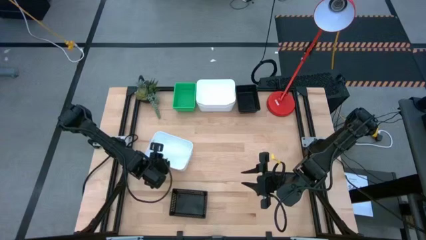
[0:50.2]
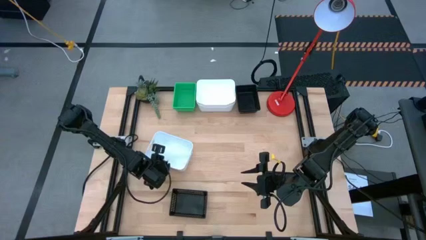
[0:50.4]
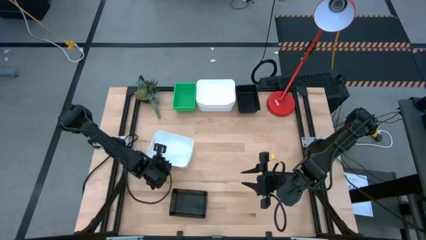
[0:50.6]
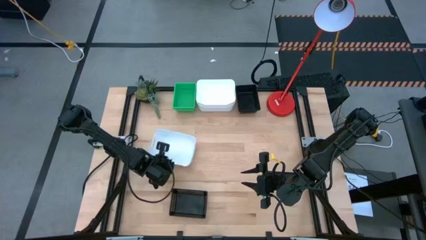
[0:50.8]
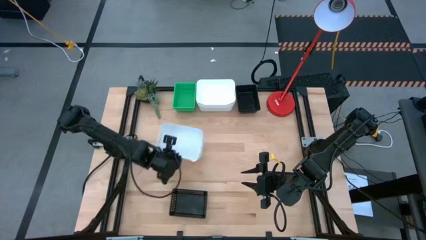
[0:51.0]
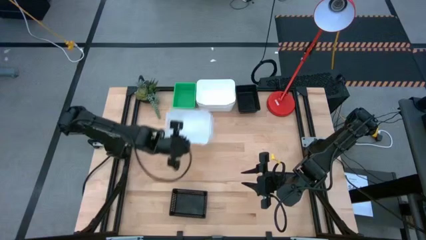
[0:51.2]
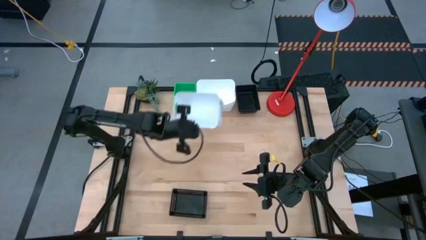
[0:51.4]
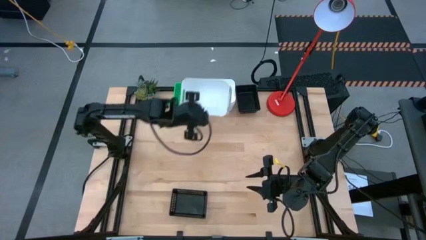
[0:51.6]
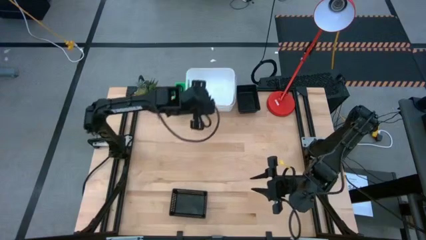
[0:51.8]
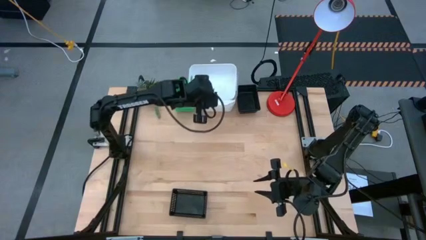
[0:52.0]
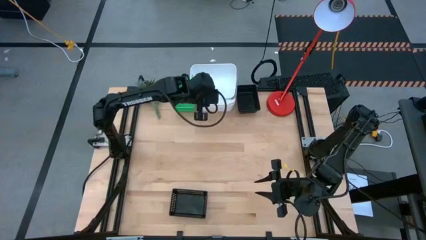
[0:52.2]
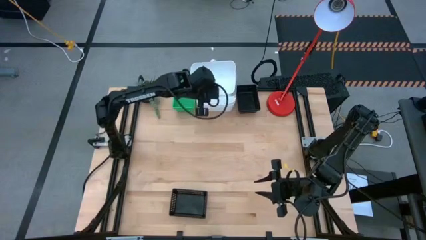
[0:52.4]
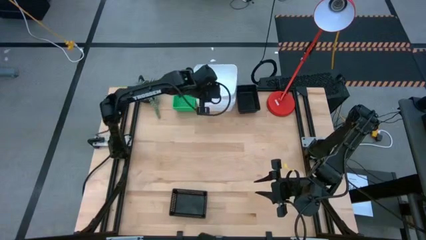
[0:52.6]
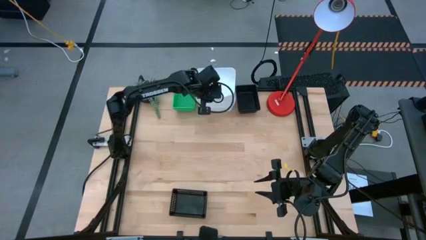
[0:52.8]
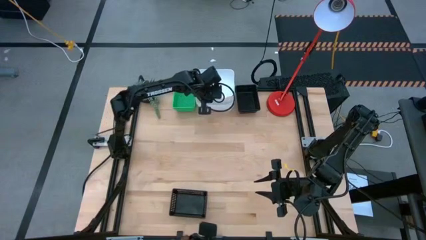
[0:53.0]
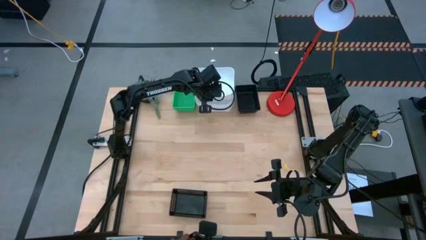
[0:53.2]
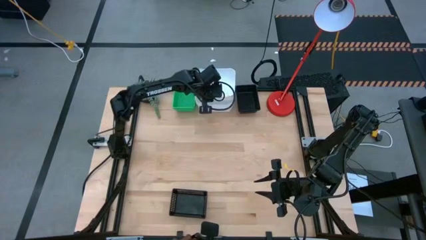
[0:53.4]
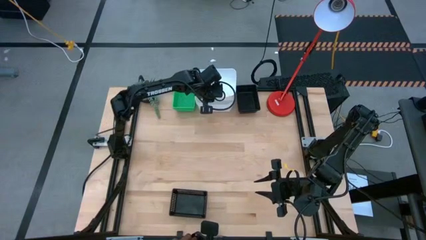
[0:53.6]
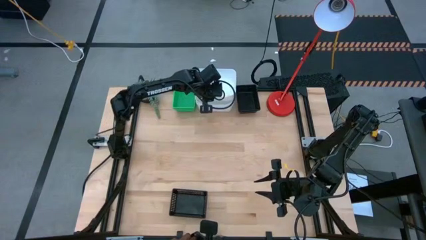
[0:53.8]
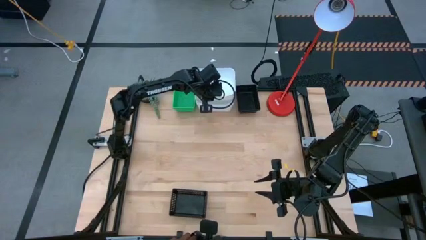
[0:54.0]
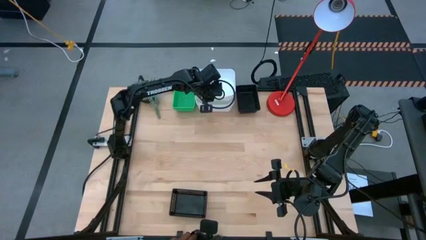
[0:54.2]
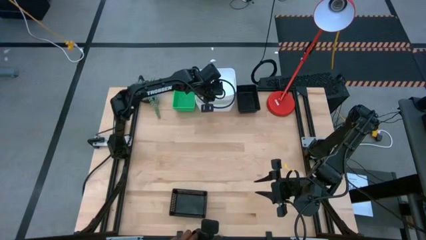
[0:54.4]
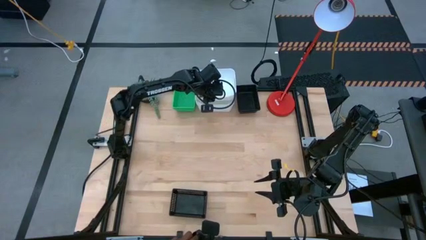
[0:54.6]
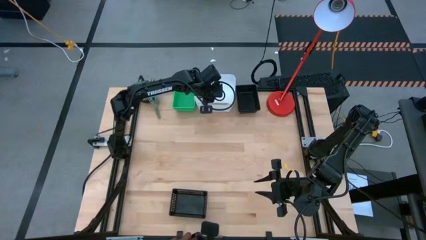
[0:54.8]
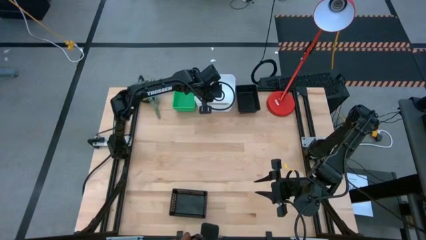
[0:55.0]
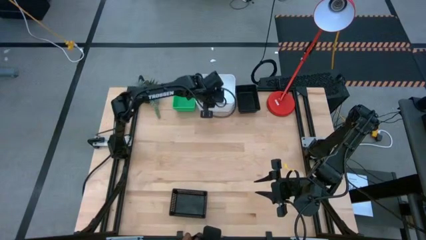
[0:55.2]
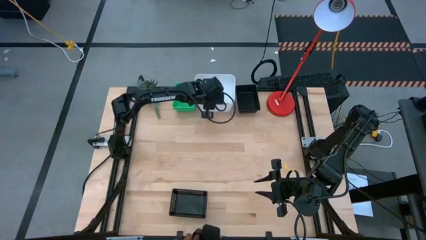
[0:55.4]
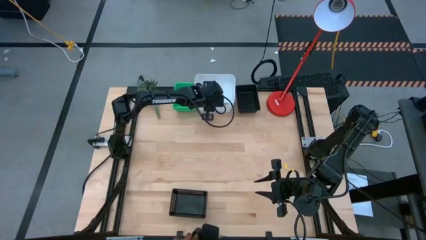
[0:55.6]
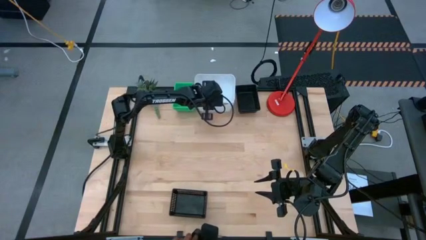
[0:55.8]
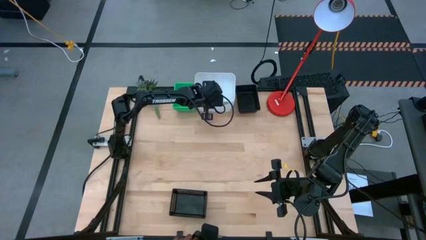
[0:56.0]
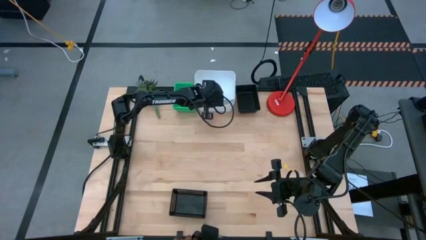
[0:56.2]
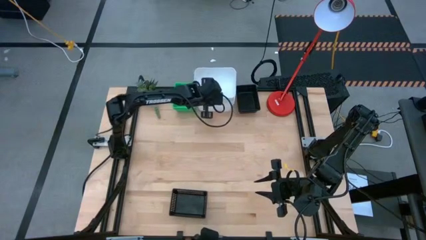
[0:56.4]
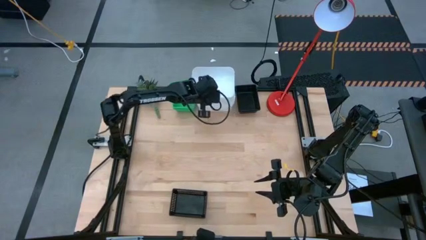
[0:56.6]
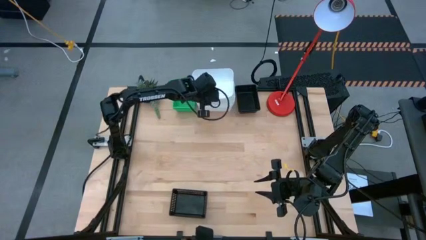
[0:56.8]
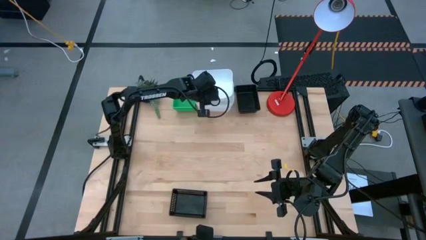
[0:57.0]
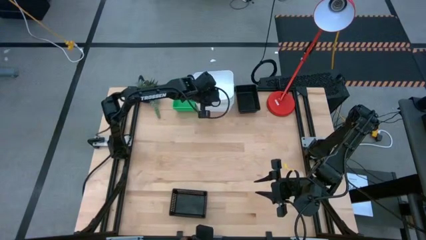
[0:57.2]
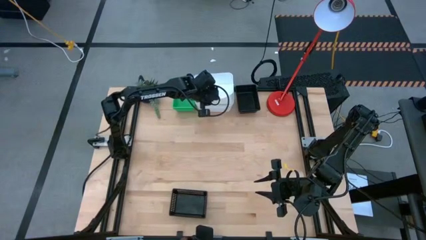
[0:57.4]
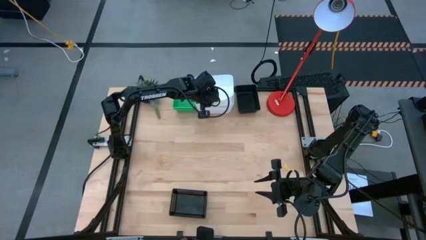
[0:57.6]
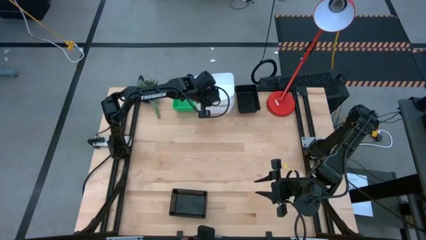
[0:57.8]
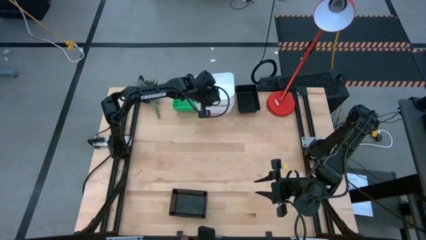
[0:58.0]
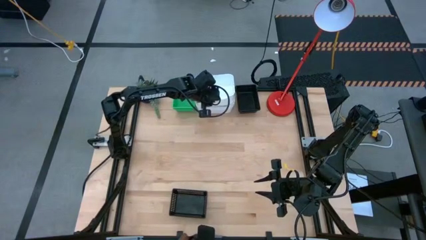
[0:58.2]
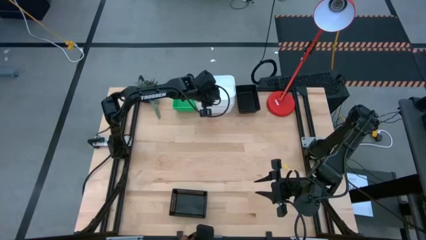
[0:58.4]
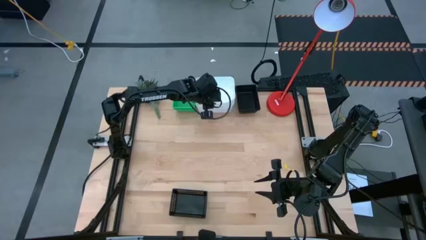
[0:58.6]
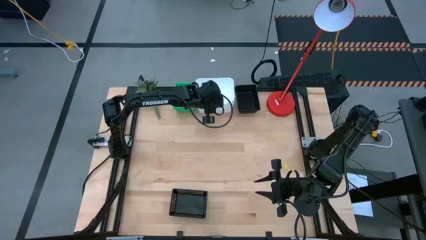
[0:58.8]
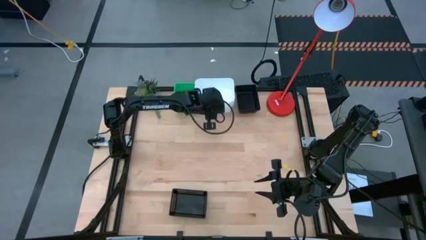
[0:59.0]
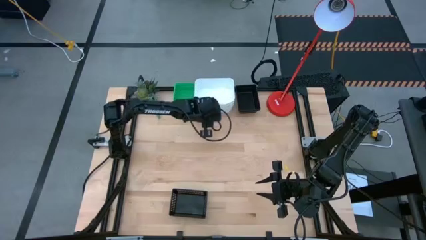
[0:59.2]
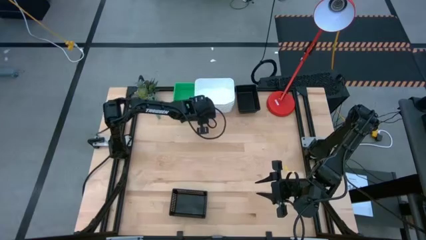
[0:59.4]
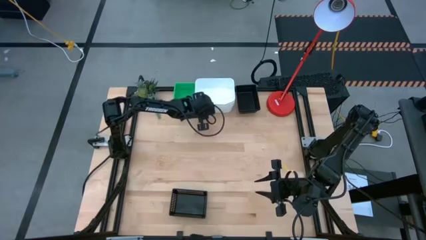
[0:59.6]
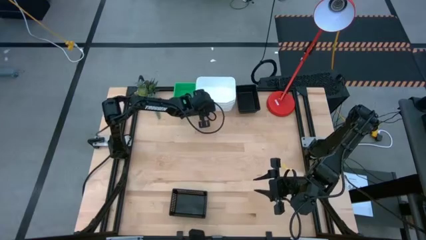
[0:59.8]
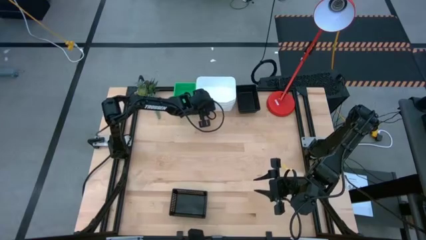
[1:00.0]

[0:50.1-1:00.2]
Stack the bottom white bin on the stacked white bins

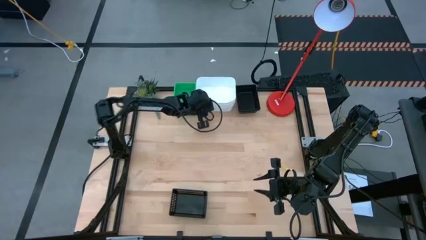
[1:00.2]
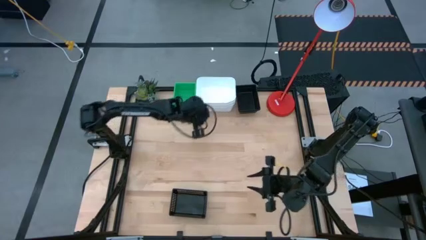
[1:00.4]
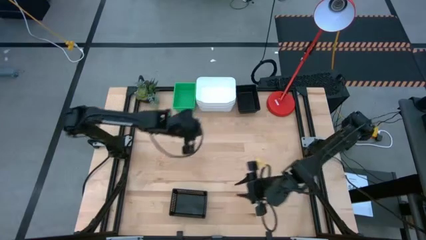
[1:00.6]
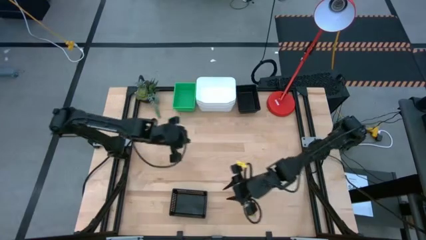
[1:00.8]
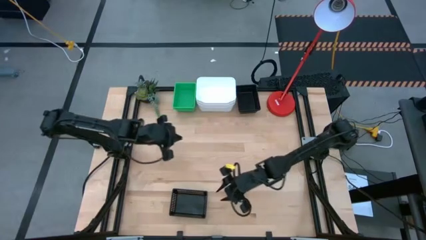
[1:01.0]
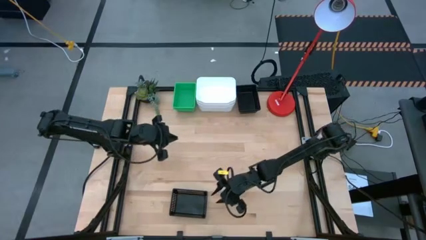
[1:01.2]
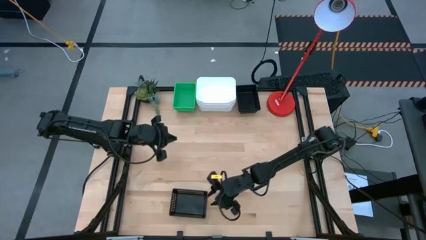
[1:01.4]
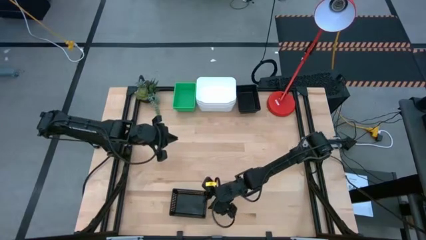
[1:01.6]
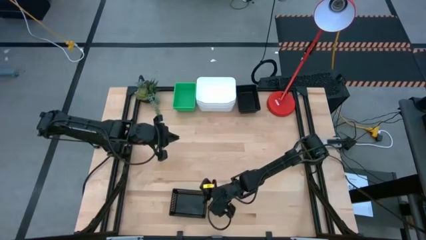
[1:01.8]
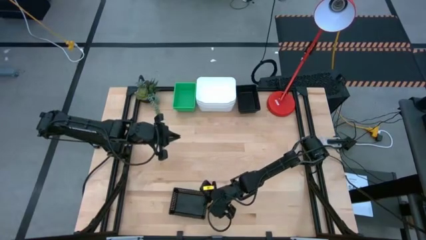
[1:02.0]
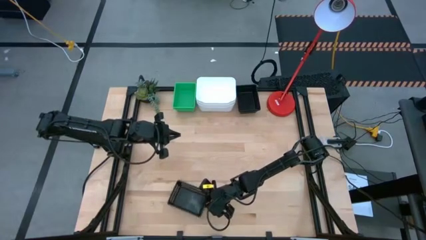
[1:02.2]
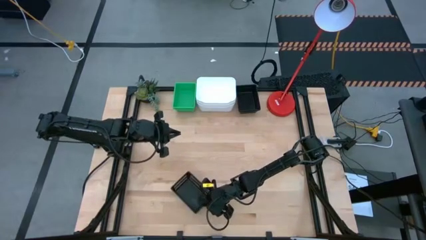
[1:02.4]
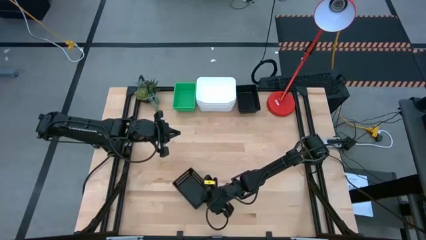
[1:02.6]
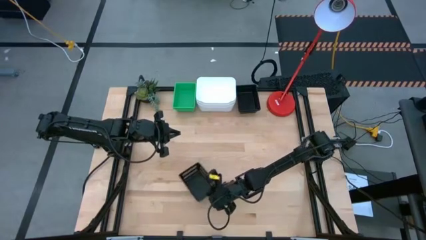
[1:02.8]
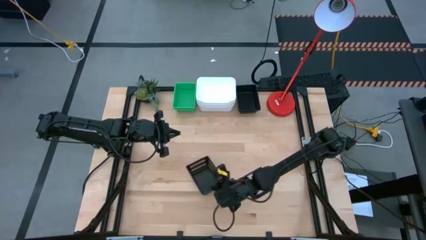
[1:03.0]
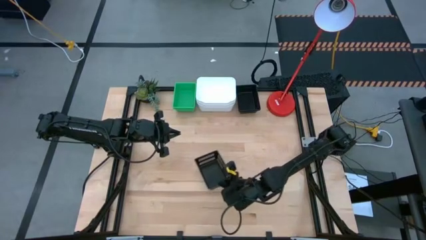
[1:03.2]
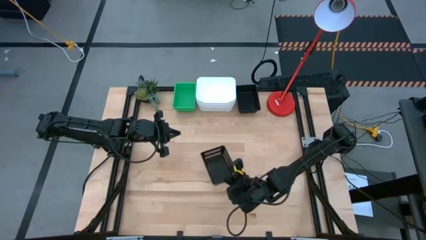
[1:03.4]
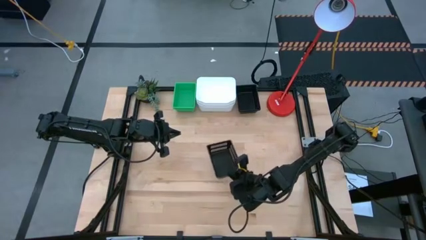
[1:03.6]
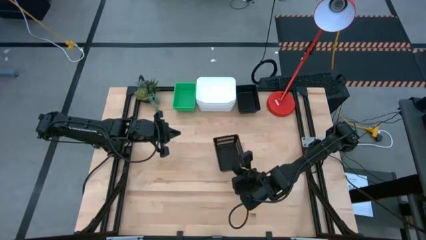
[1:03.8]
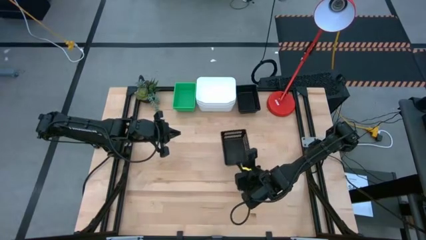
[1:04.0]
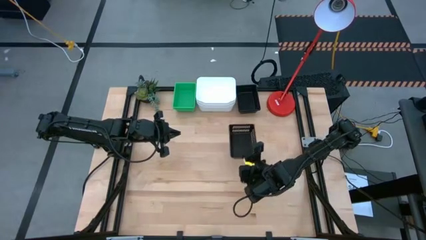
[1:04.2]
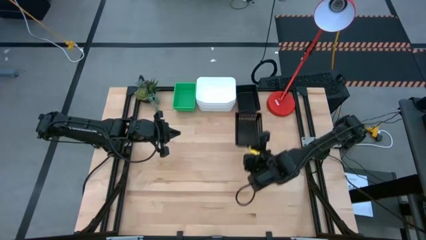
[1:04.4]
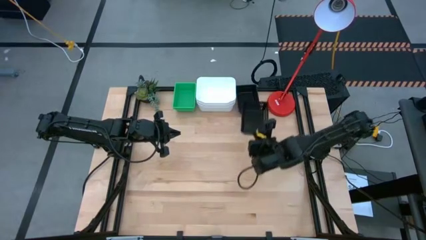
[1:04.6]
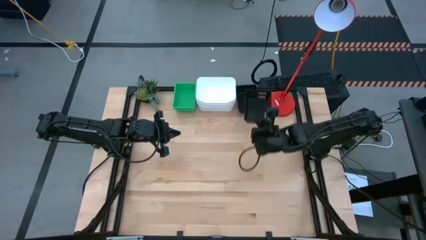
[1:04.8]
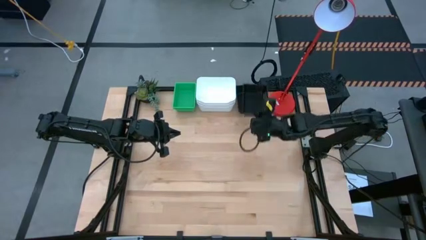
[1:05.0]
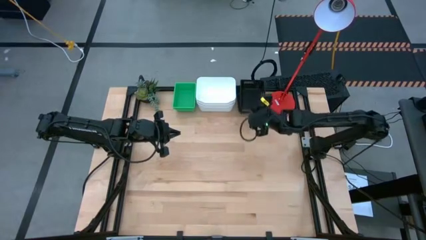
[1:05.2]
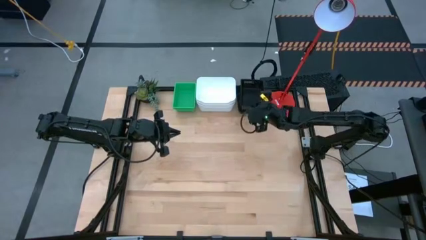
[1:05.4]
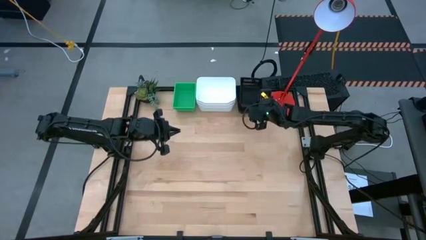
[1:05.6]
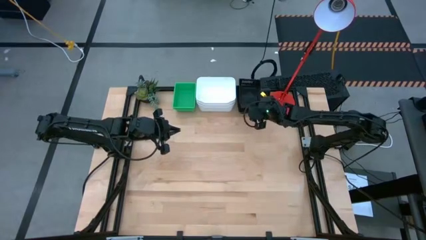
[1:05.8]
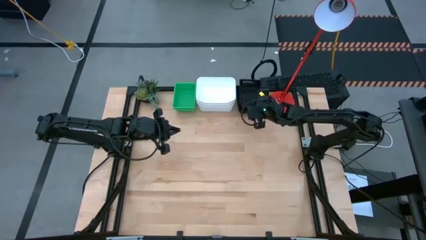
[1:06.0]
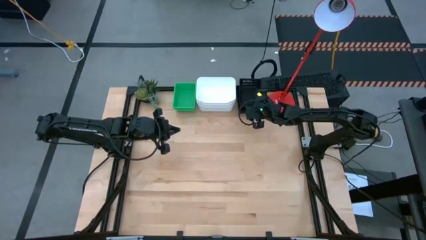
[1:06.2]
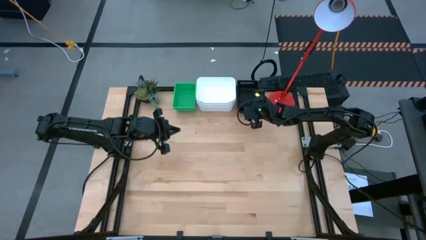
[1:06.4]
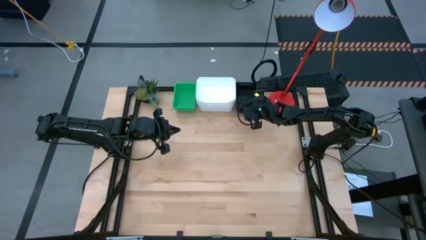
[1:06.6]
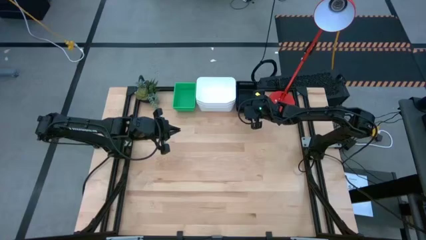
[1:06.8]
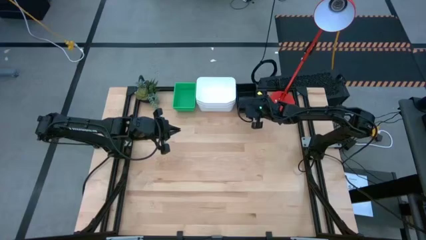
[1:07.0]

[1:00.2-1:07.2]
Stack the bottom black bin on the top stacked black bins
